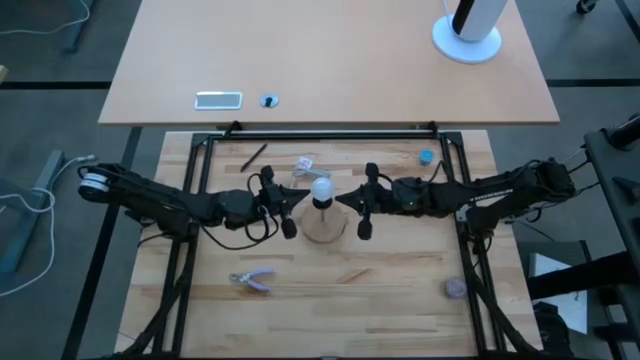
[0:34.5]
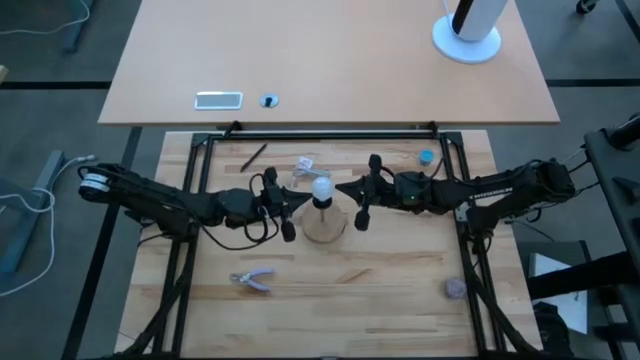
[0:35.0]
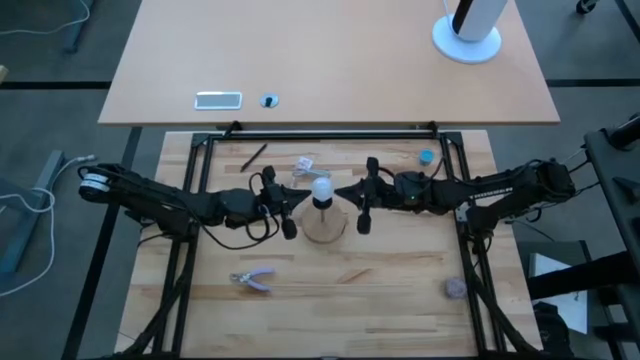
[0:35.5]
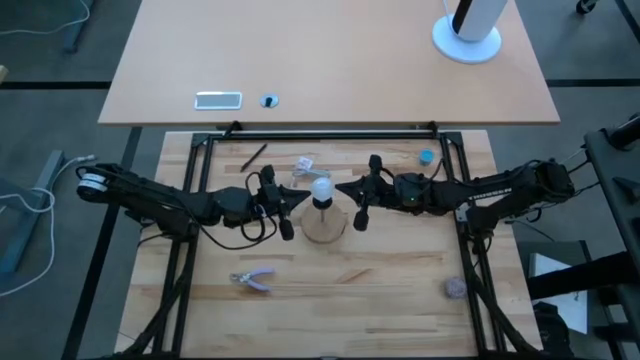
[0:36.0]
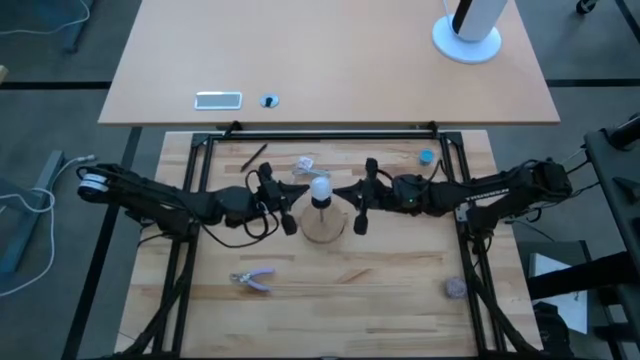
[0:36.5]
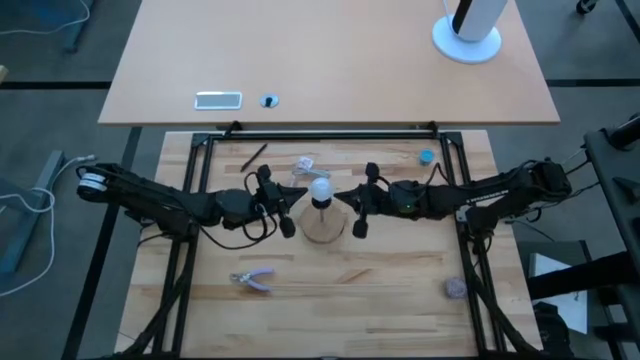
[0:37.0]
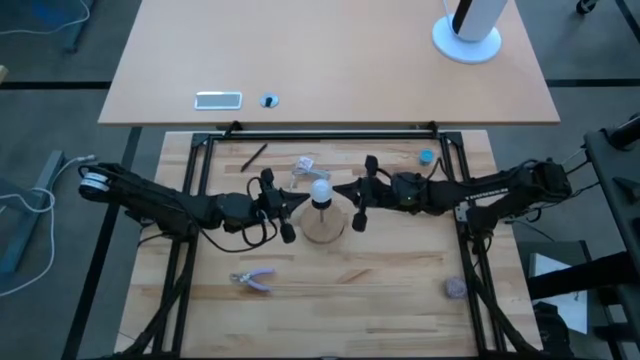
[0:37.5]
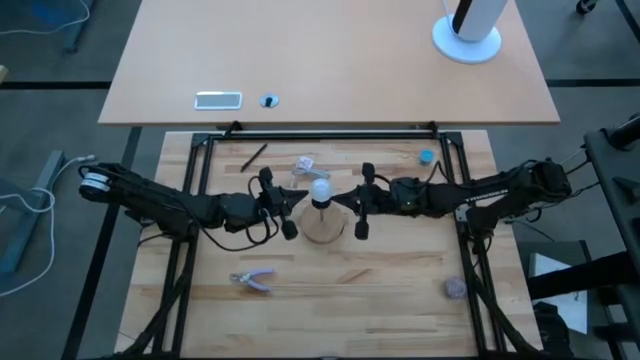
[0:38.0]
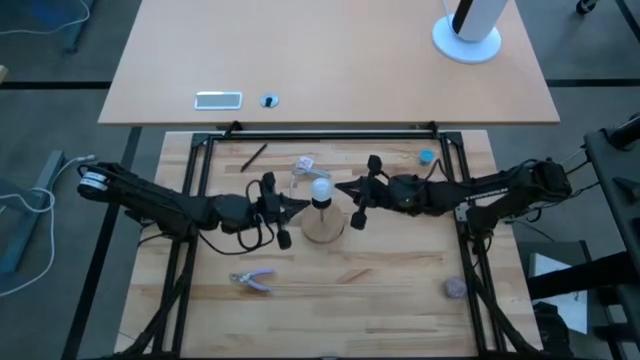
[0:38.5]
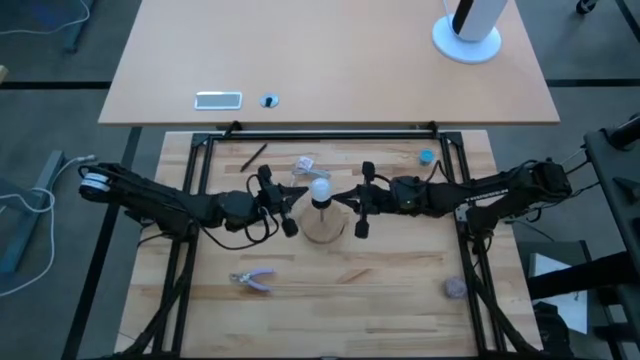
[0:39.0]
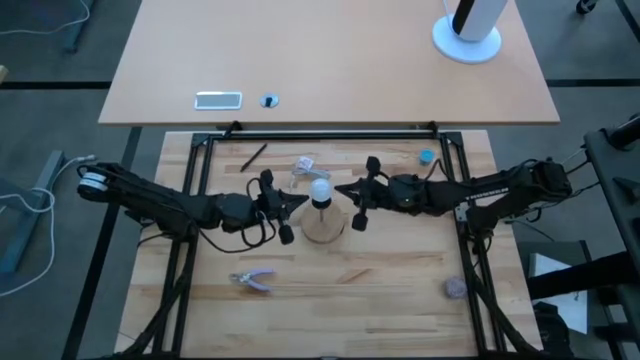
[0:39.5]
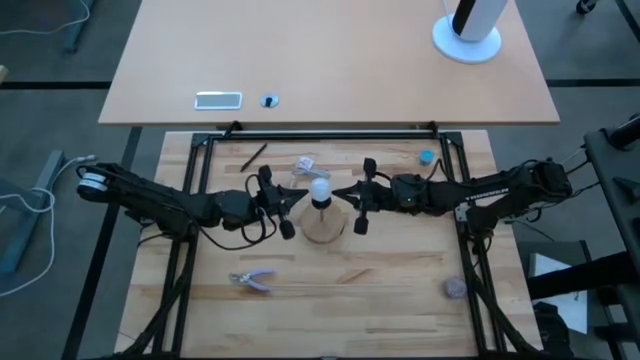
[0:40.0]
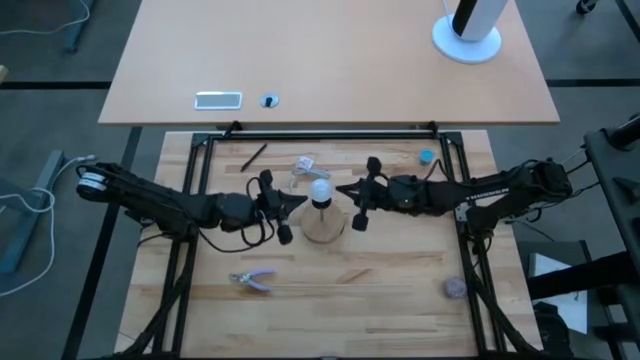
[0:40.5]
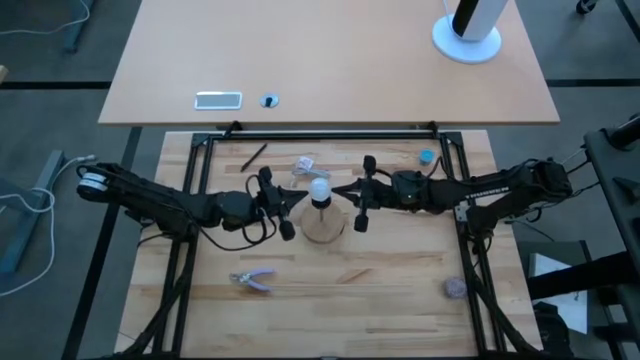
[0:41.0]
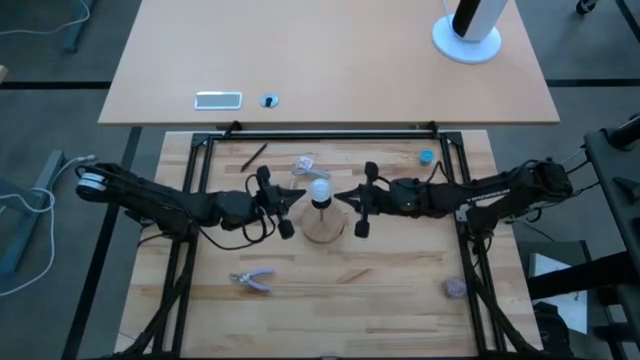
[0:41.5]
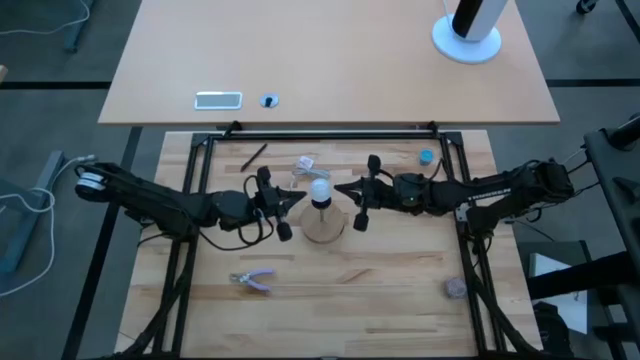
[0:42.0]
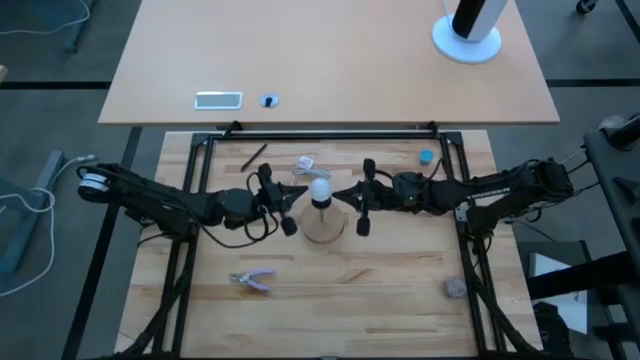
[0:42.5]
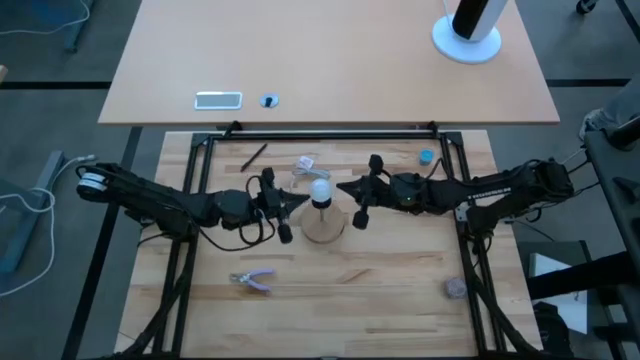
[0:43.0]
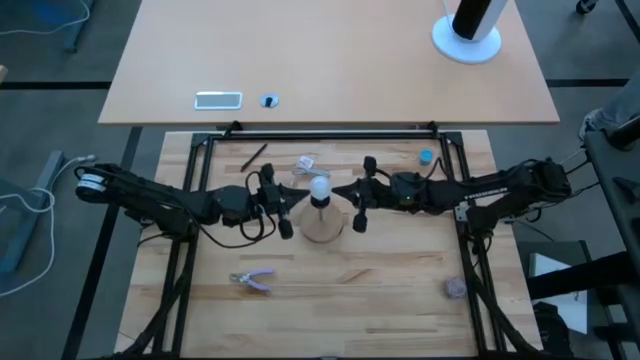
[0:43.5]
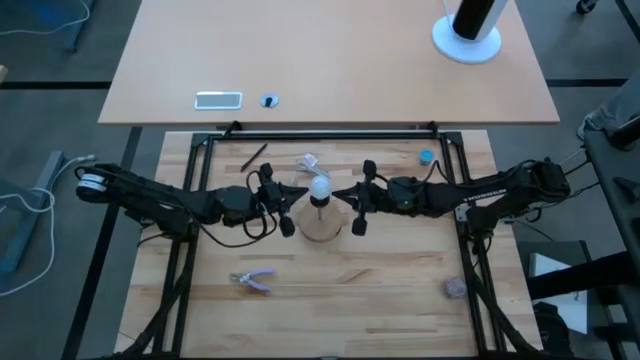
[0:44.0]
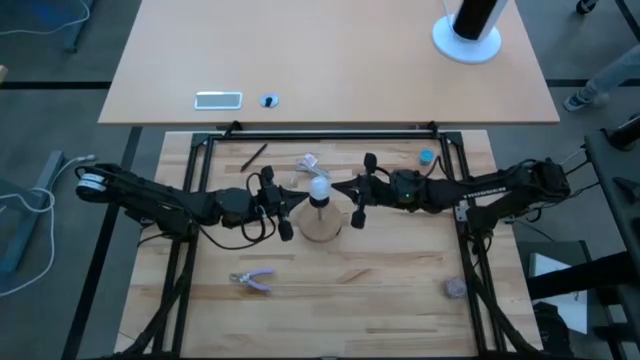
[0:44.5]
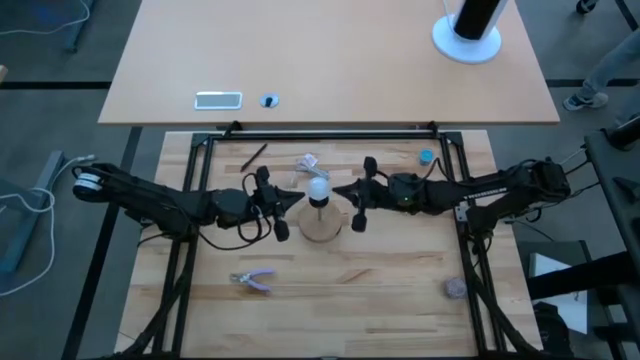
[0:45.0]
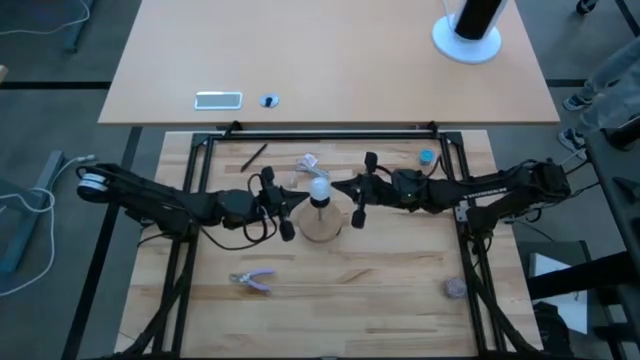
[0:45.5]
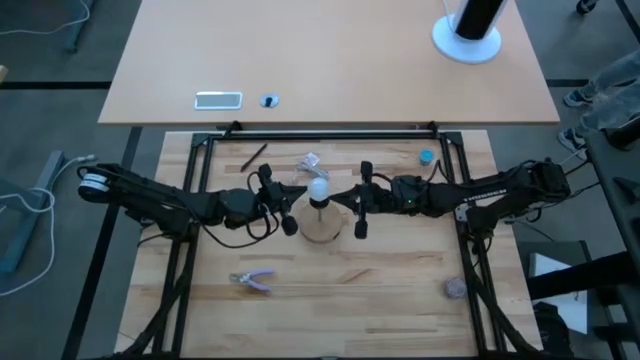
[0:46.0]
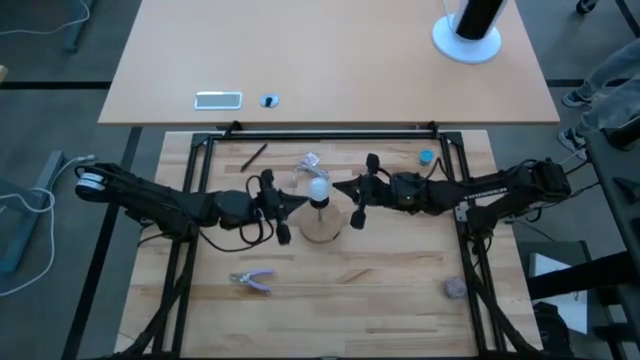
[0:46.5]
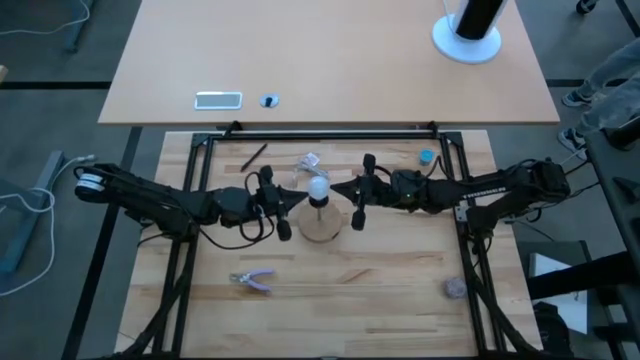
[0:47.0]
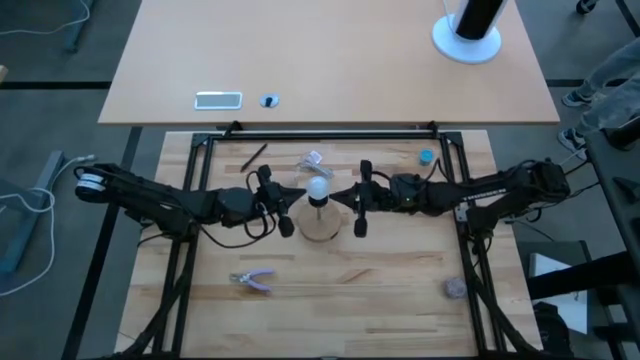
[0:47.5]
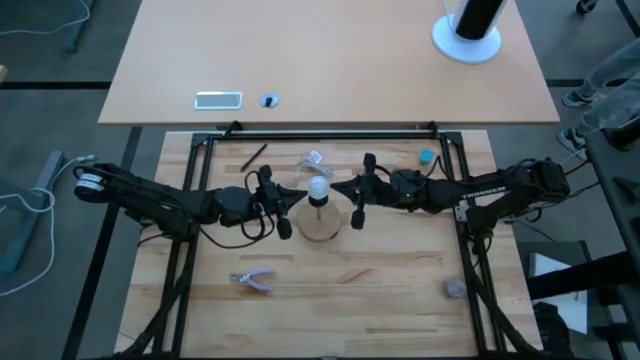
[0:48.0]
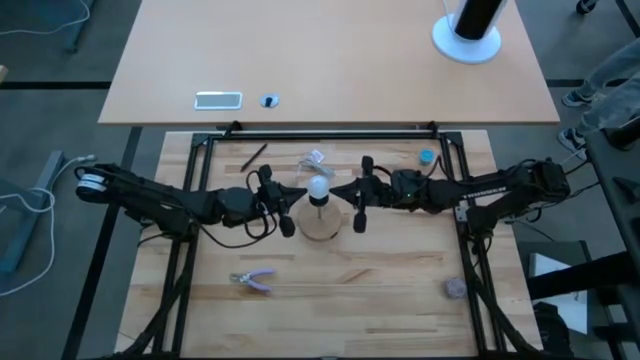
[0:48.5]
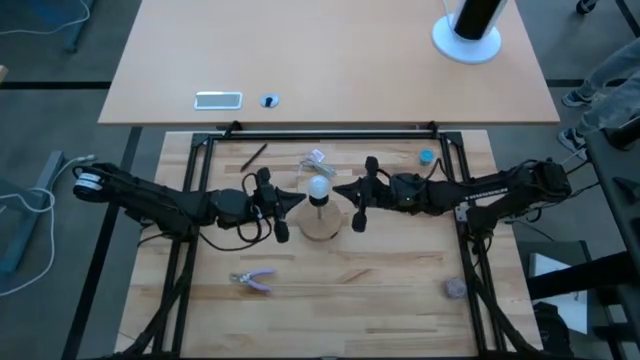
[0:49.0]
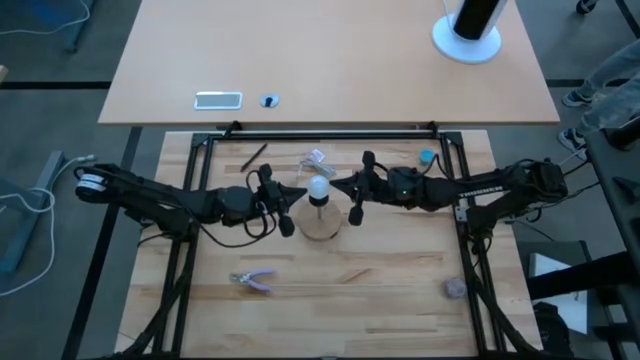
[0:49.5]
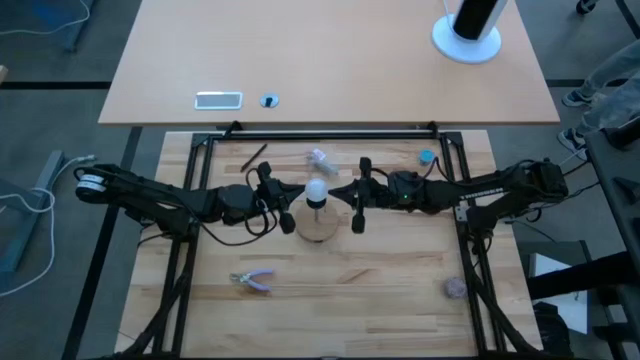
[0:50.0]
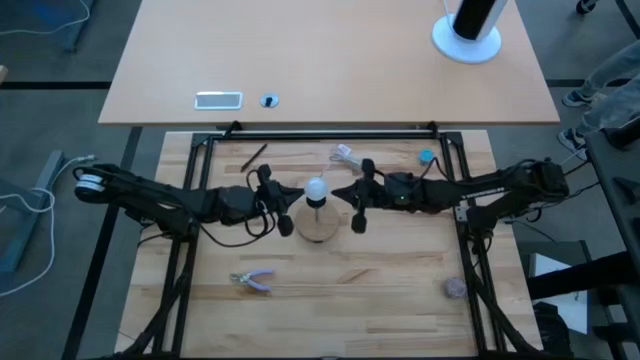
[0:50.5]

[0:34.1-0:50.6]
Task: Screw lightbulb
Insert the lightbulb into the lamp

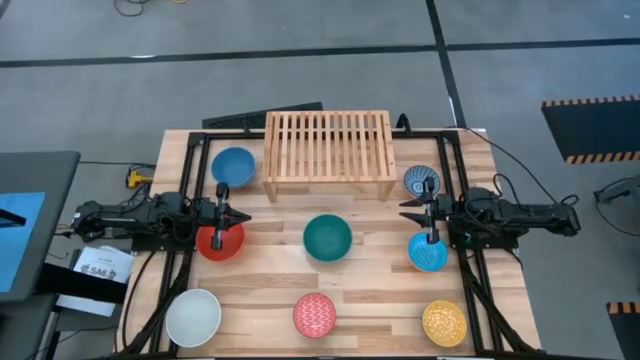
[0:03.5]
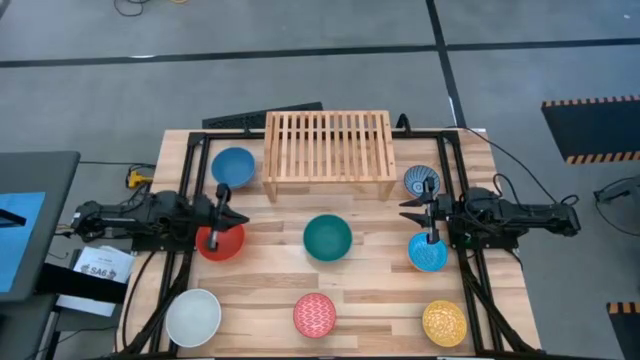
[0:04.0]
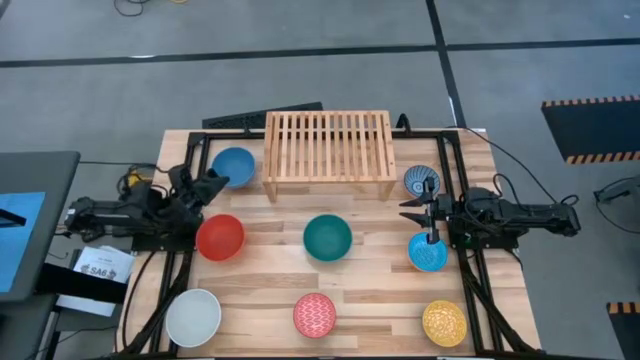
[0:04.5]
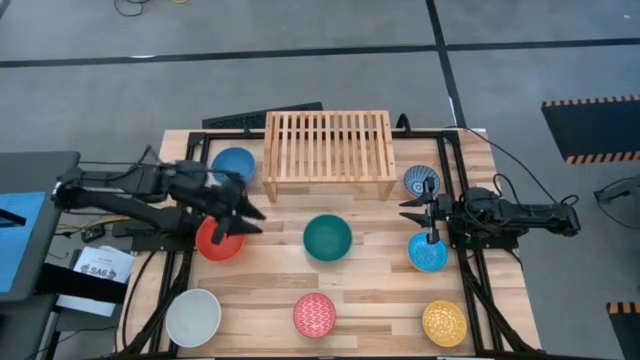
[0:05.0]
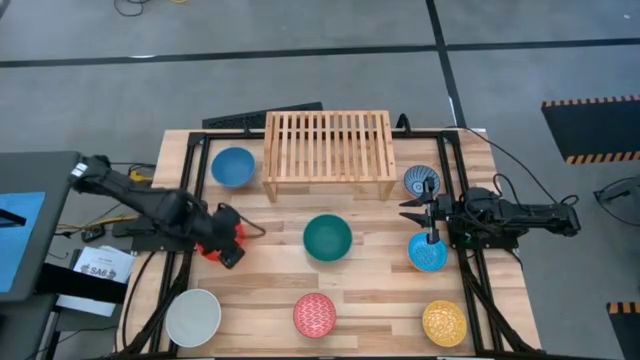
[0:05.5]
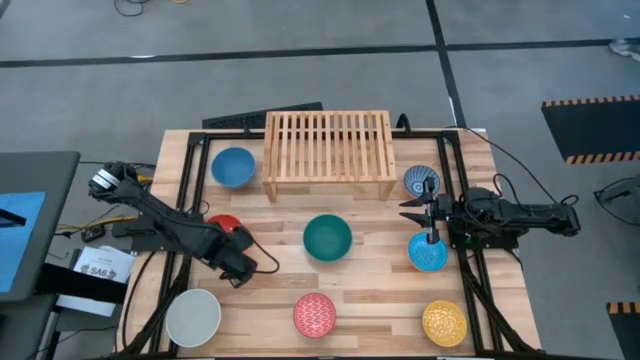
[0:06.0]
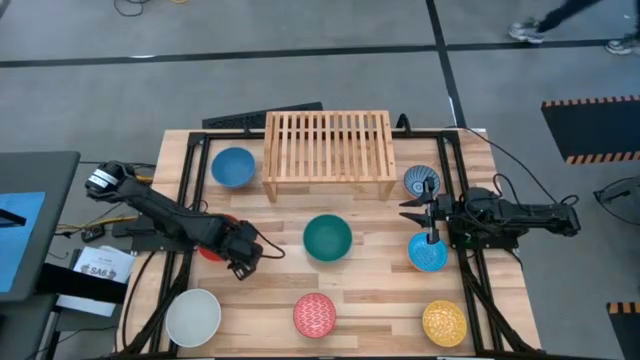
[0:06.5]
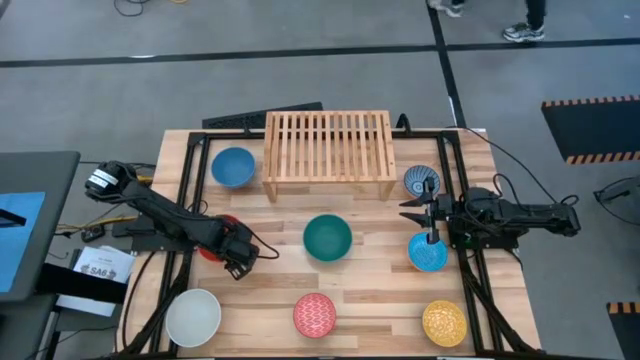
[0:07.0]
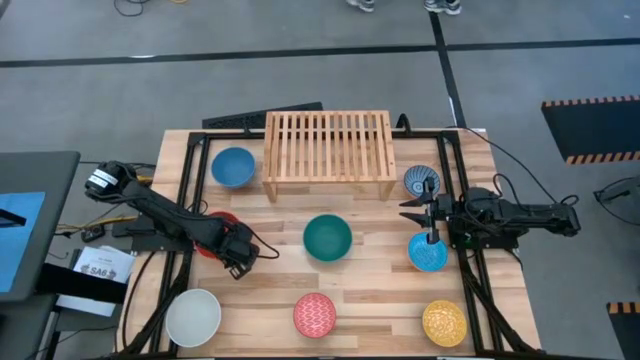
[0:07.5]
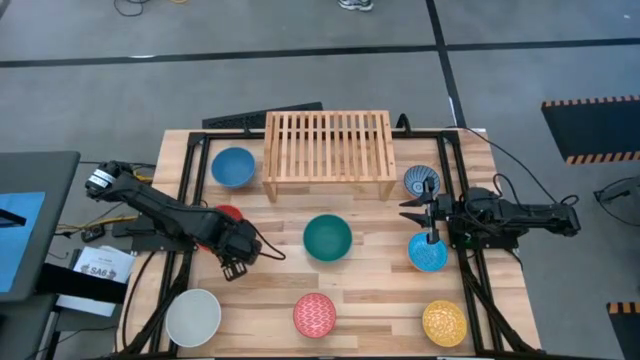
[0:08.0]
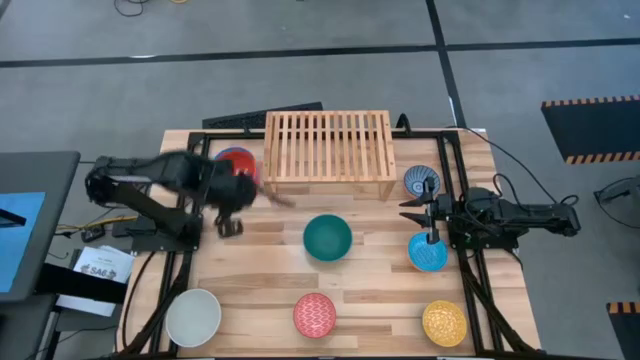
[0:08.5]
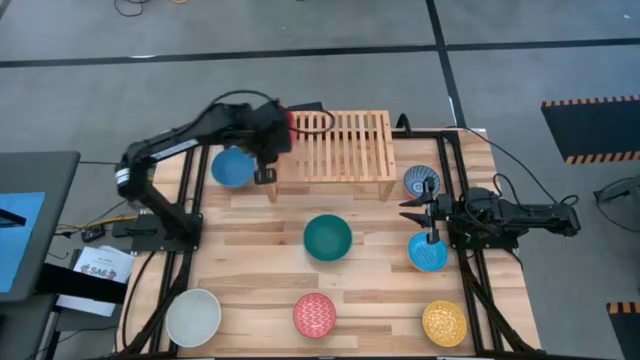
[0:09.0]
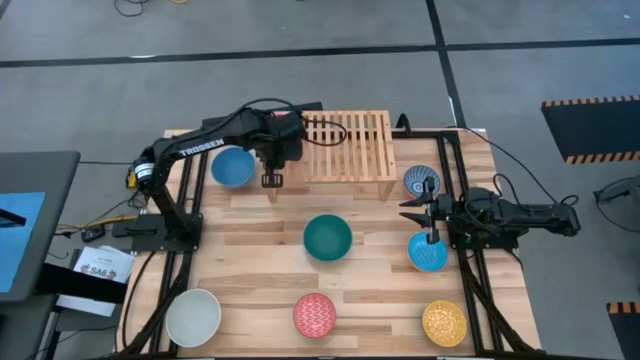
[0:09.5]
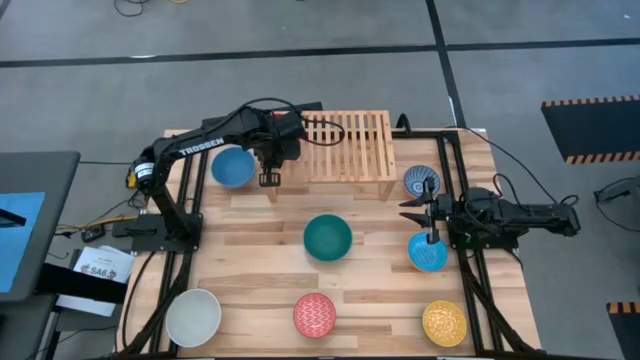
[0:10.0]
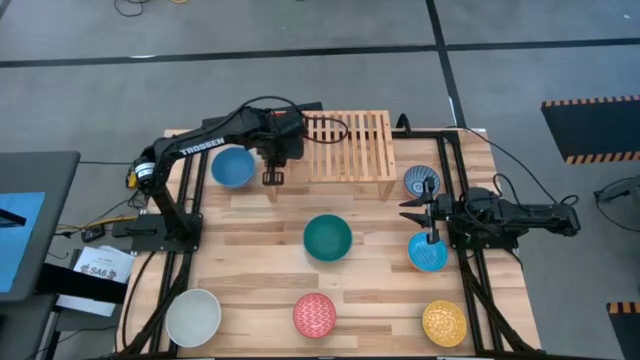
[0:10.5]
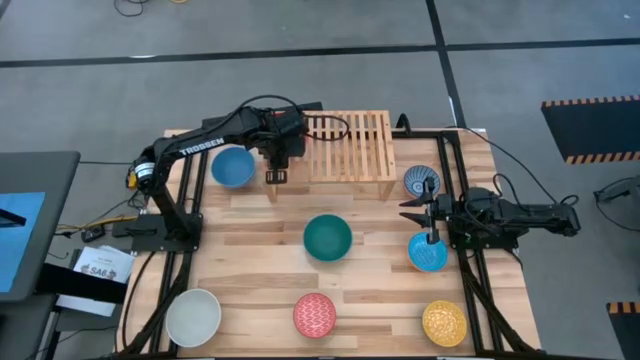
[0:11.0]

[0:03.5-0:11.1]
Task: Place and stack bowls onto a shelf
Put the large orange bowl on the shelf
